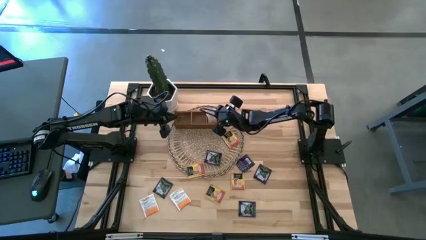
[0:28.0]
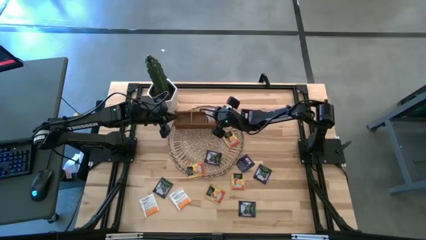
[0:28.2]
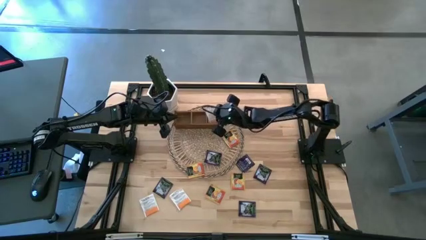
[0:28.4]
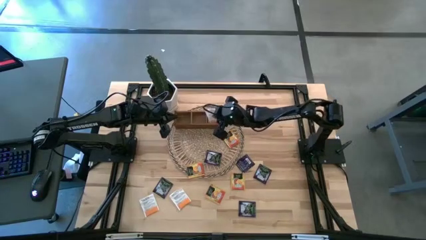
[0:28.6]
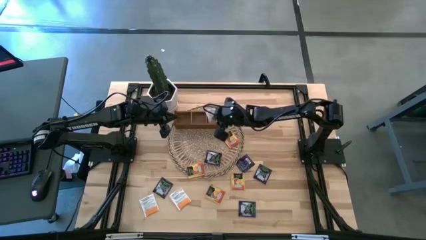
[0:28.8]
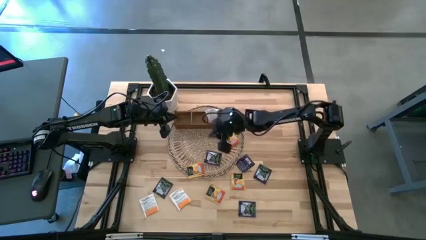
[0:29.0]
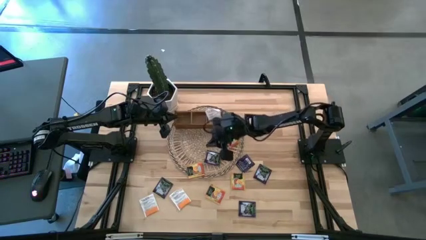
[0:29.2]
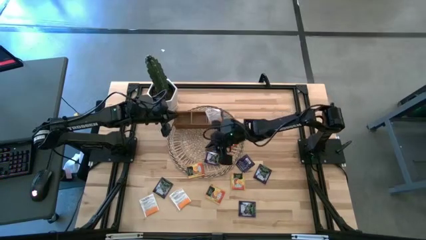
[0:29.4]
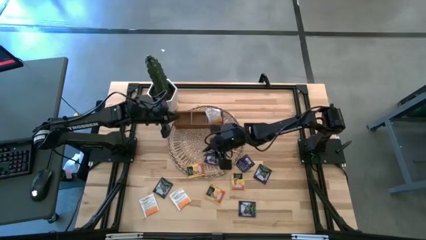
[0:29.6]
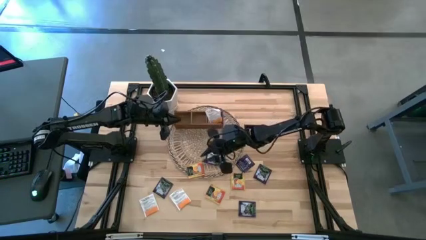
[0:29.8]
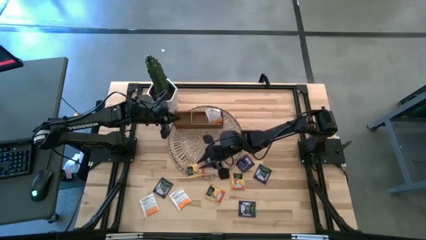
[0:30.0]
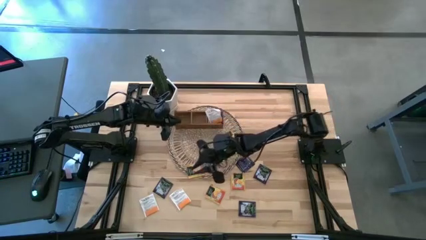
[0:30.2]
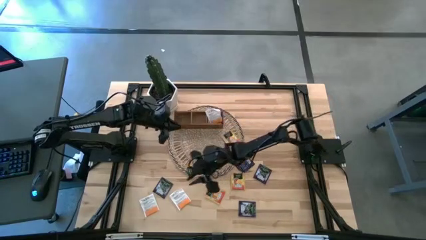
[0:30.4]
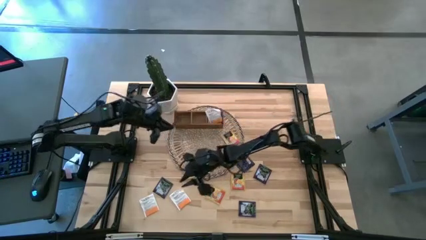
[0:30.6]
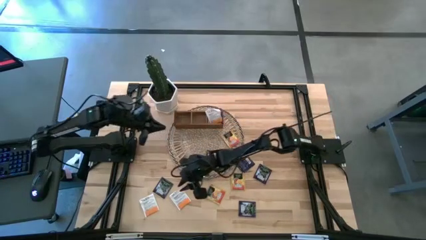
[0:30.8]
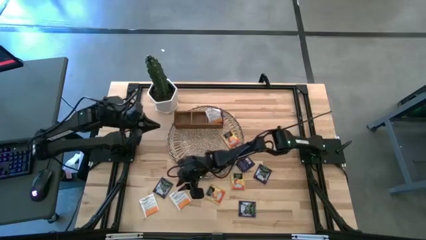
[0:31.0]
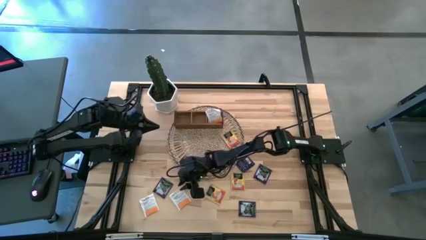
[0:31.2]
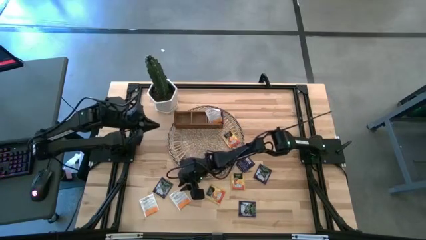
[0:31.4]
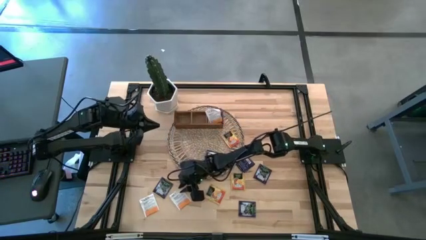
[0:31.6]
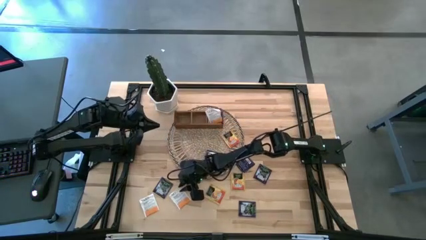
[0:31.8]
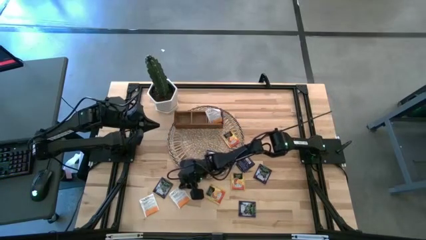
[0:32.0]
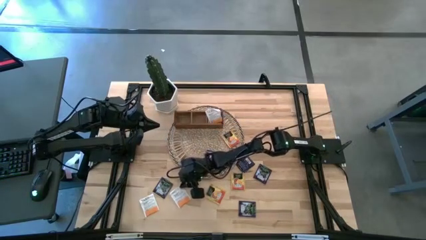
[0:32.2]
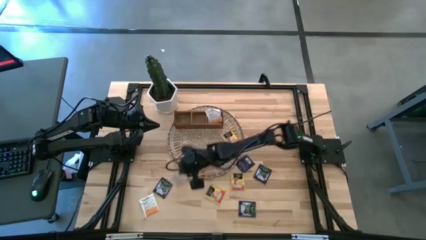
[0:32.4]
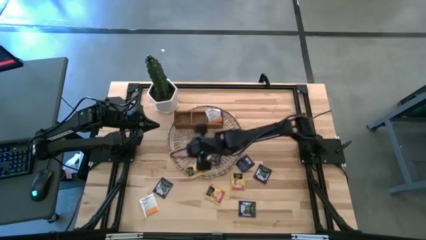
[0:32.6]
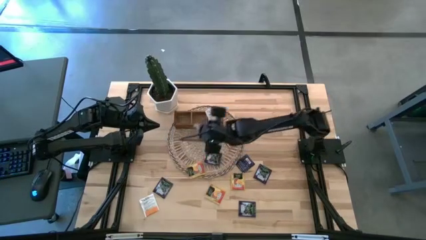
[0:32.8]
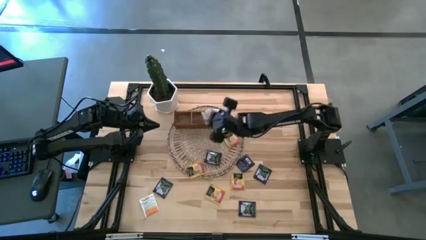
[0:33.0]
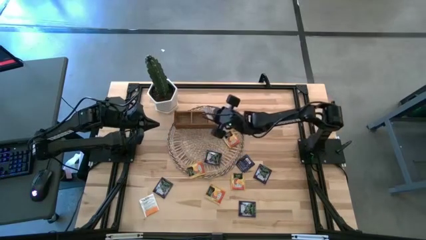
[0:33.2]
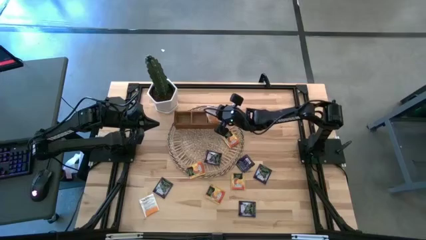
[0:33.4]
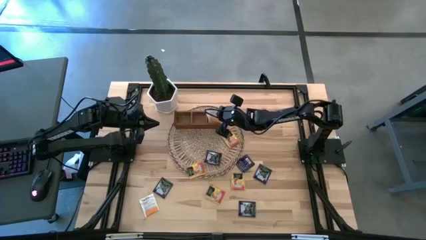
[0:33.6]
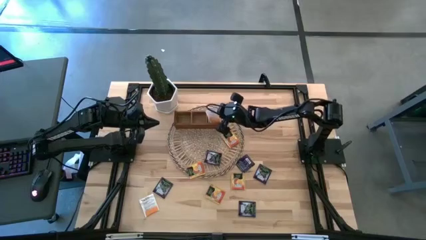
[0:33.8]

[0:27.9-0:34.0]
Task: Pick & Place Tea
Put the white tea bag into the right section of the wooden organizer

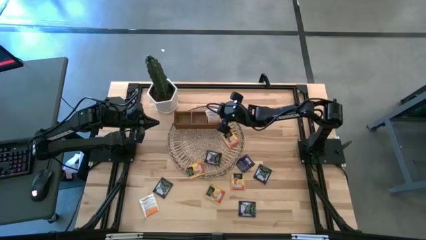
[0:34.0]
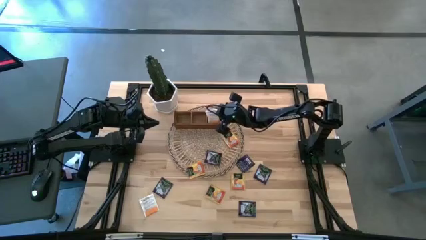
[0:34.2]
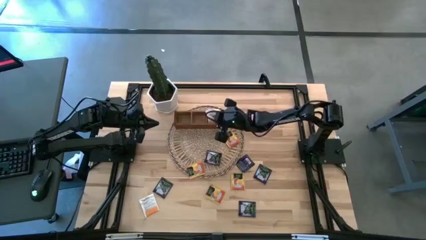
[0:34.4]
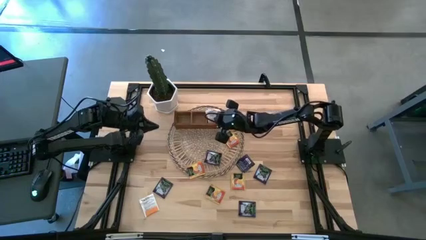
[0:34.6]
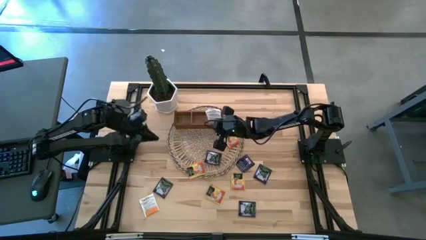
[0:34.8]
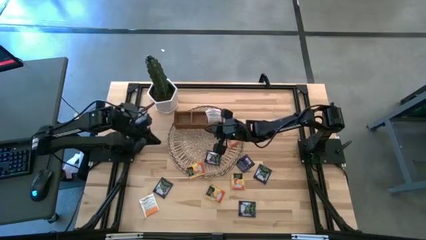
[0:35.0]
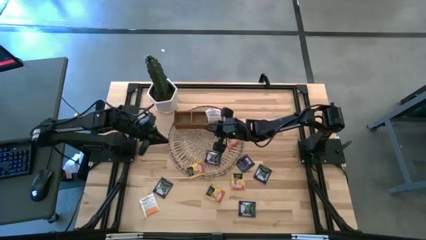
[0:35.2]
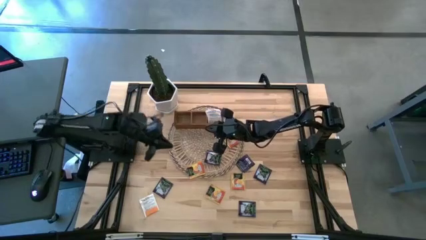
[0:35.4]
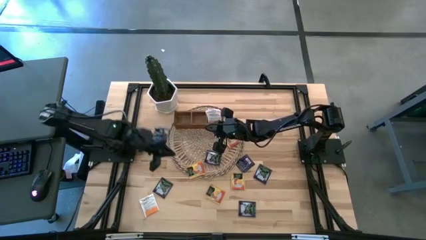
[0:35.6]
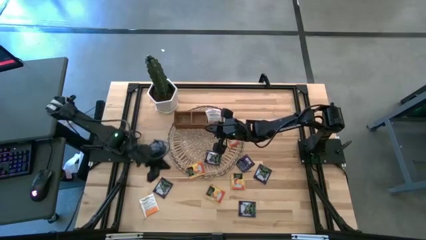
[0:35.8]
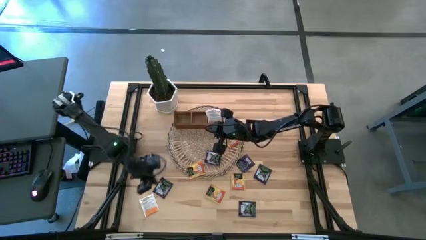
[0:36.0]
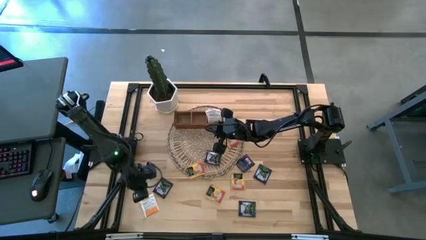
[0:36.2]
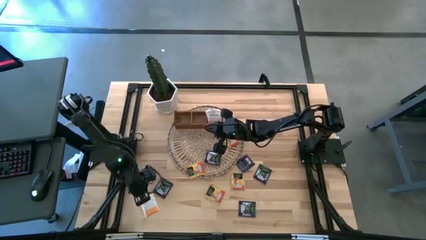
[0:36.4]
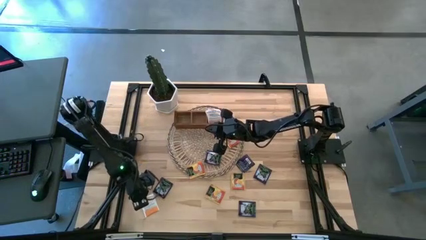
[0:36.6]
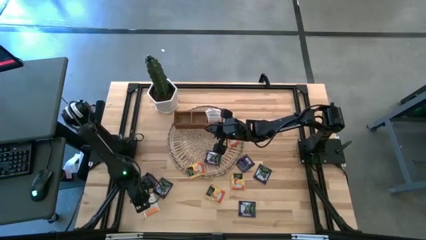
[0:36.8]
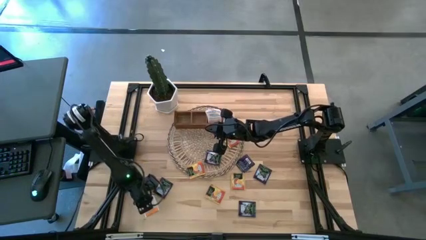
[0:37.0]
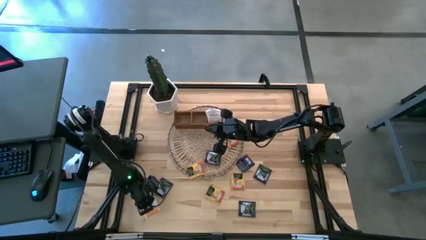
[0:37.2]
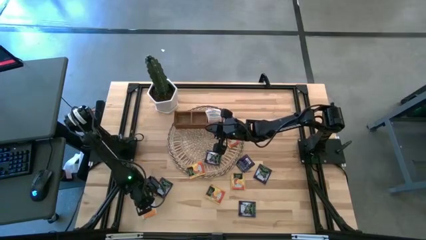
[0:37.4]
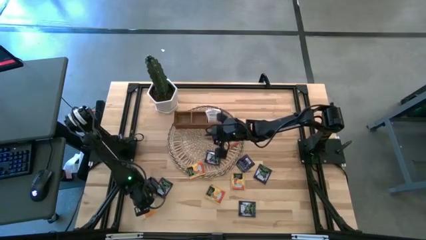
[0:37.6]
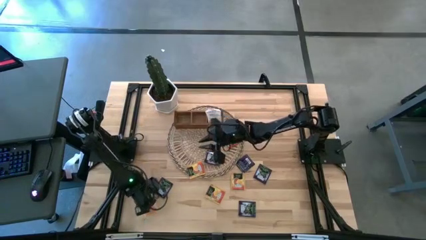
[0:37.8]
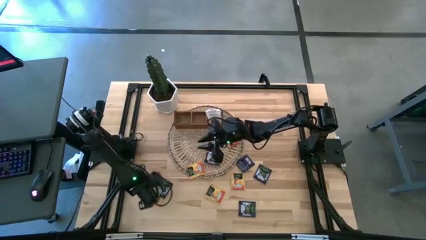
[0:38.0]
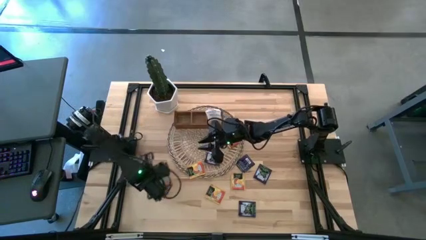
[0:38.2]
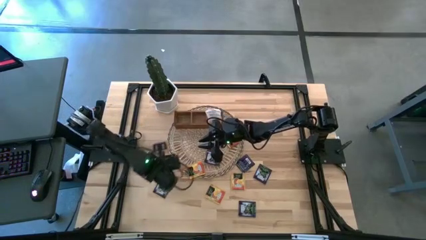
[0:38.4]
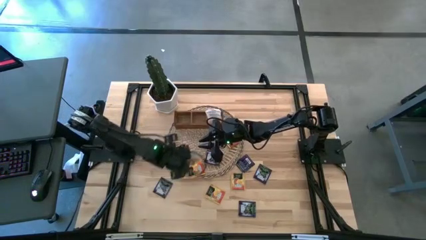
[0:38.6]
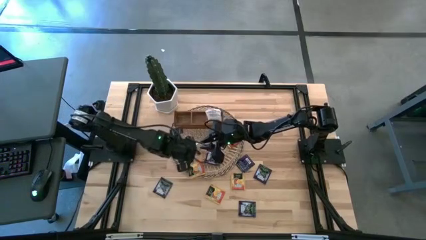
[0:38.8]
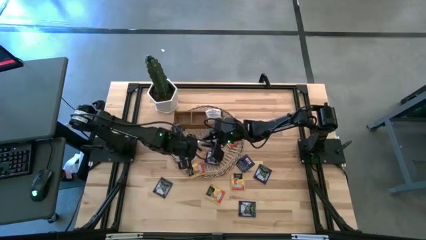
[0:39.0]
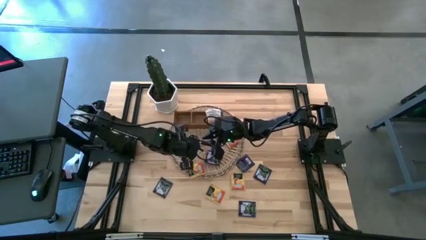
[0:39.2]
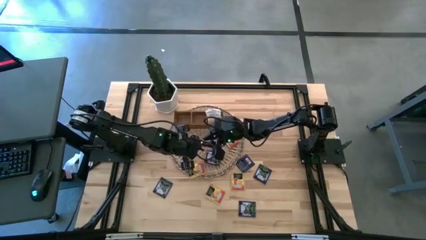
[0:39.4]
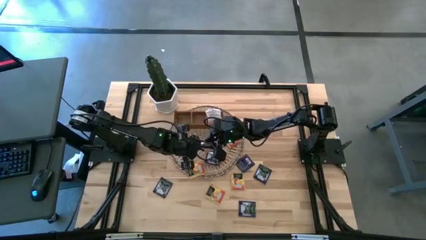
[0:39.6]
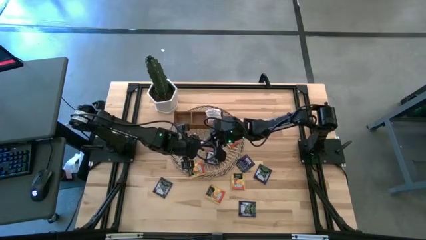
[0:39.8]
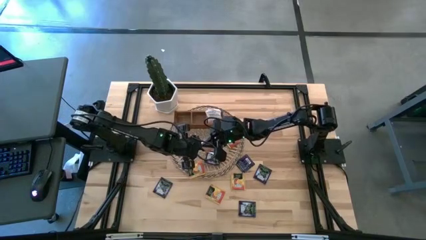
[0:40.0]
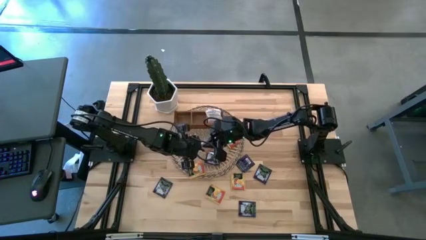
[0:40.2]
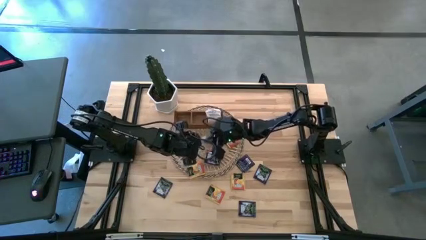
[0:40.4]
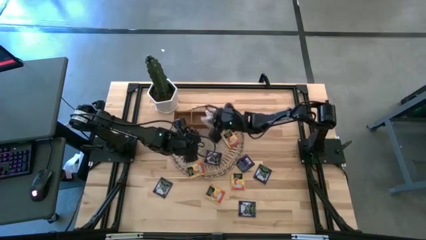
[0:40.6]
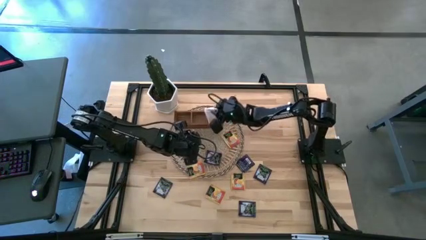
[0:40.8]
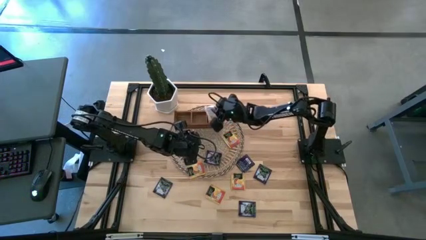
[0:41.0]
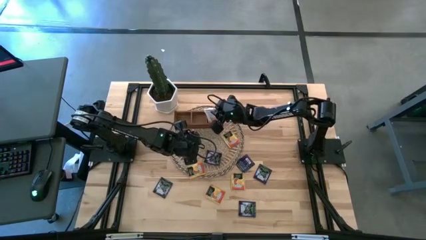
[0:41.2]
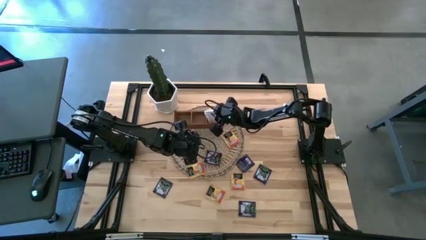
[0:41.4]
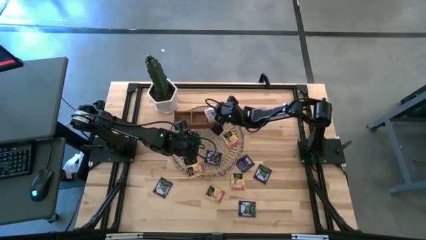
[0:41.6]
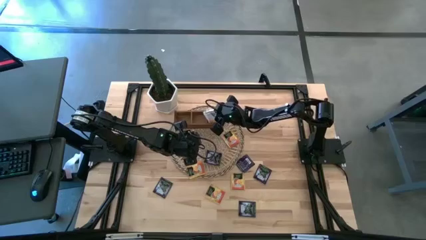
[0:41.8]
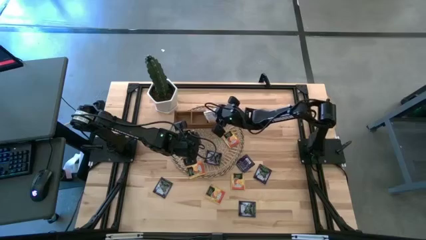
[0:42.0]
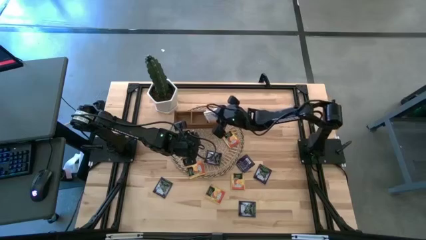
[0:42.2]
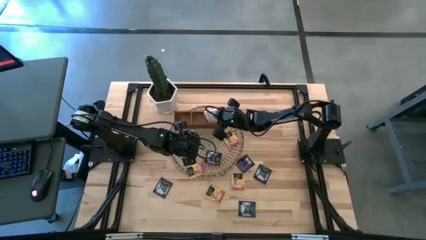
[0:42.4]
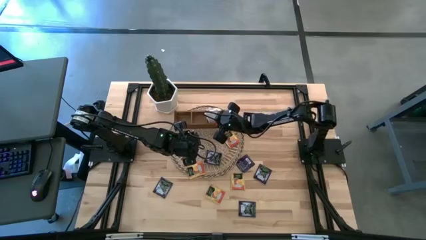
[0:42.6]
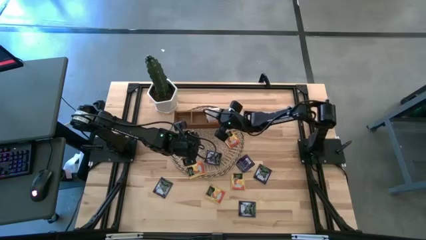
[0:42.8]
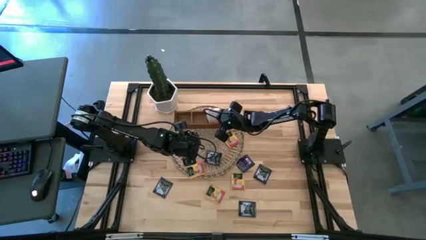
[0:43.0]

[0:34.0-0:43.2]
Put the white tea bag into the right section of the wooden organizer

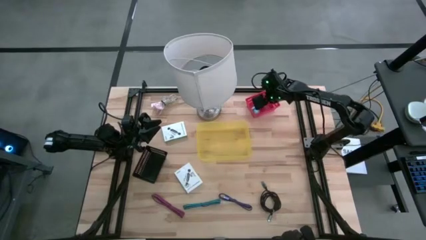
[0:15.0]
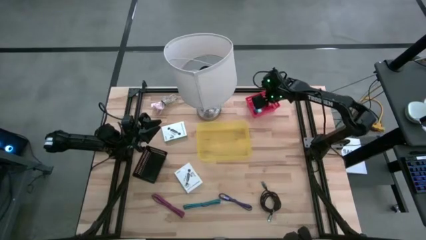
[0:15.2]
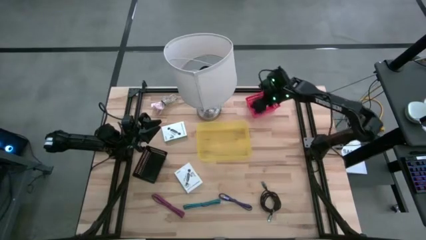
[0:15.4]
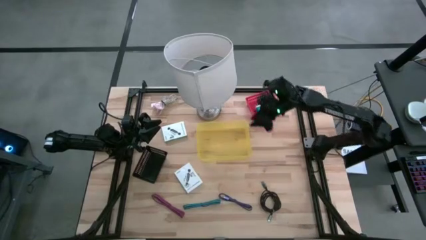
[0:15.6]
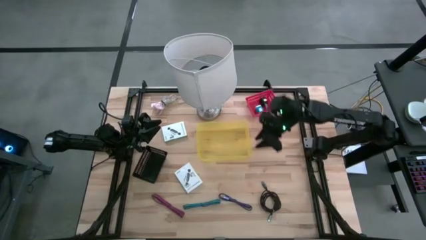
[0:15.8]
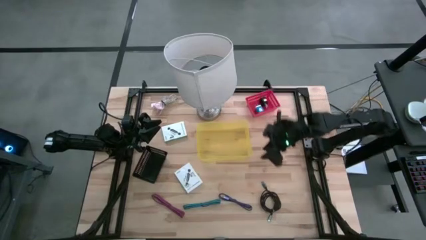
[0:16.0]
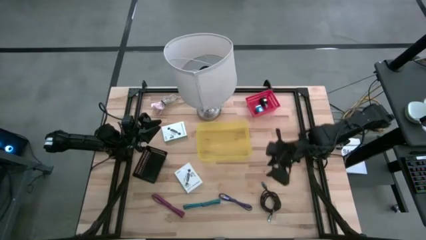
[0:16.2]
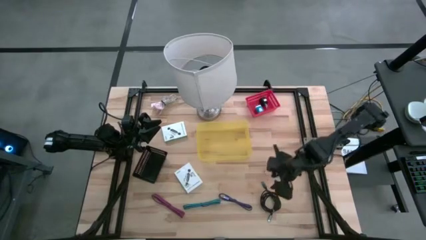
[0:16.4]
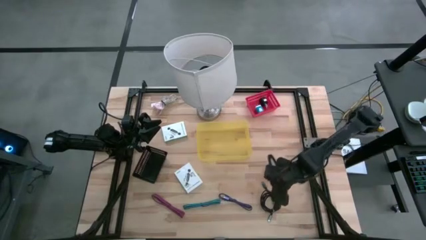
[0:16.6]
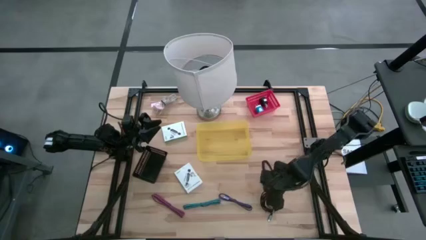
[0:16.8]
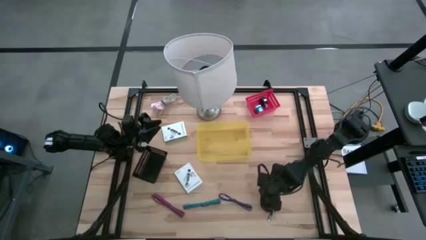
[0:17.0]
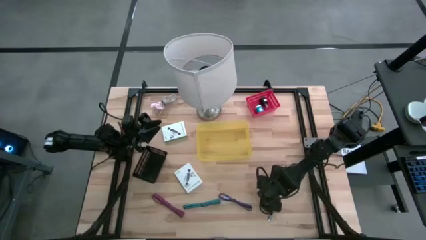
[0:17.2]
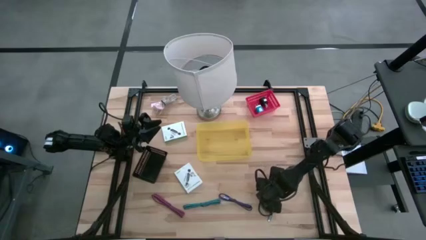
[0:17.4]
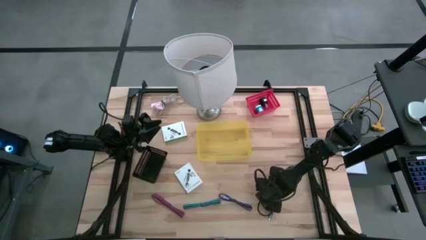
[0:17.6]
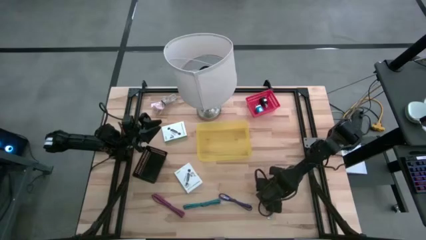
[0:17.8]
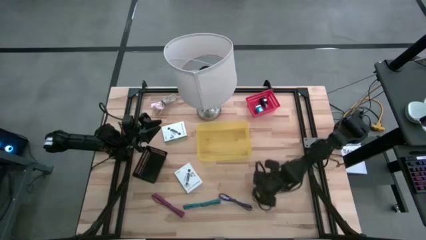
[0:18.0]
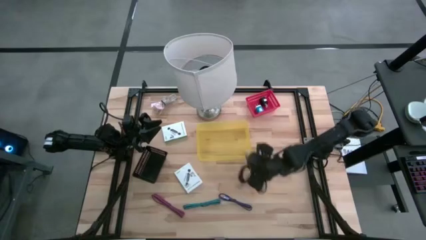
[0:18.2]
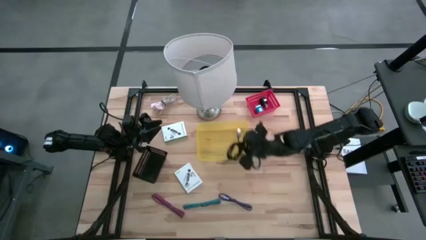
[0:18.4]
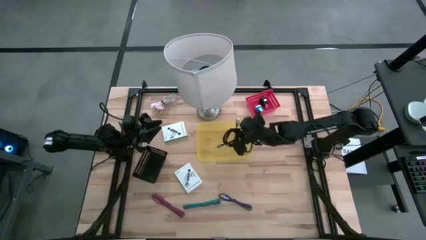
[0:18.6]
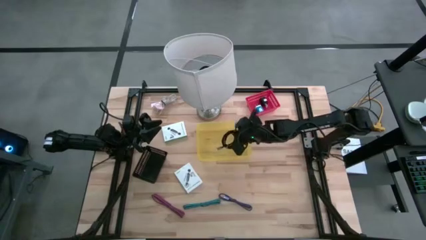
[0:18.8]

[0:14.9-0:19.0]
Task: Pick and place items into bin
Put the black USB cable into the yellow bin
